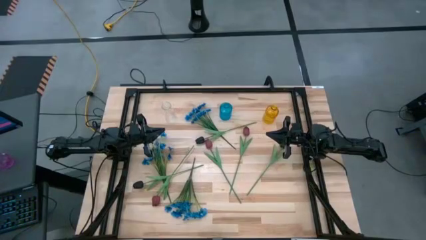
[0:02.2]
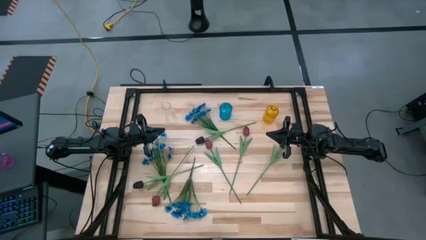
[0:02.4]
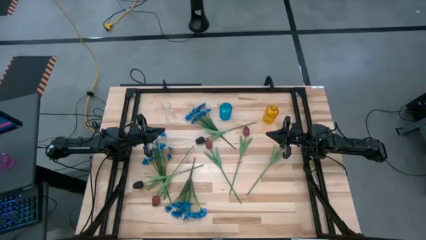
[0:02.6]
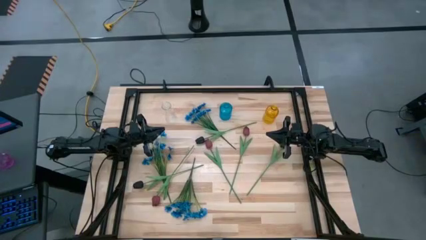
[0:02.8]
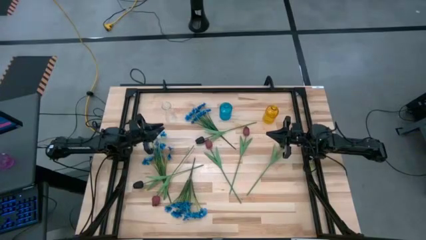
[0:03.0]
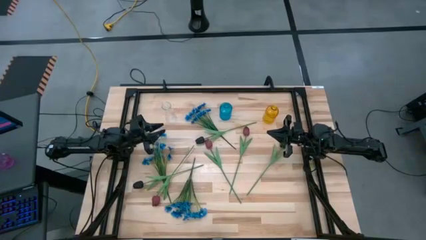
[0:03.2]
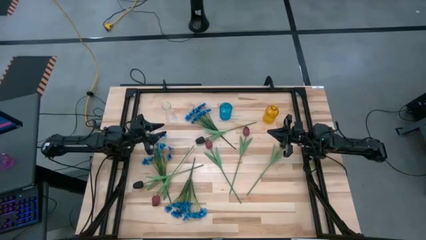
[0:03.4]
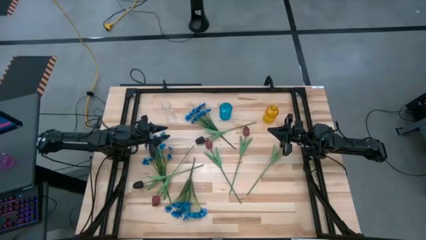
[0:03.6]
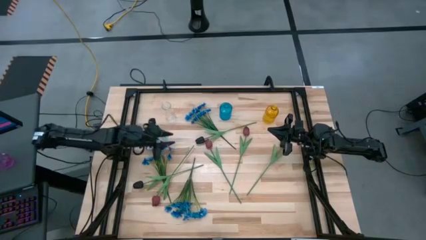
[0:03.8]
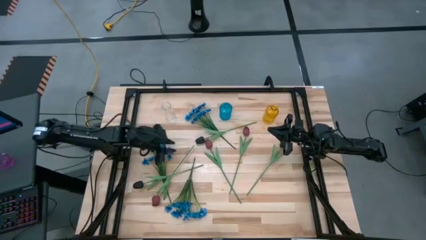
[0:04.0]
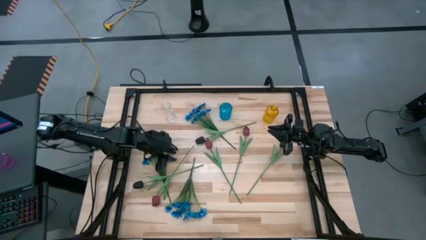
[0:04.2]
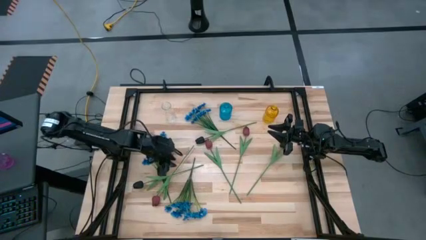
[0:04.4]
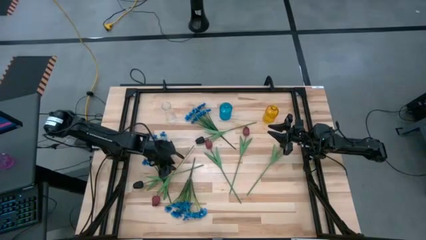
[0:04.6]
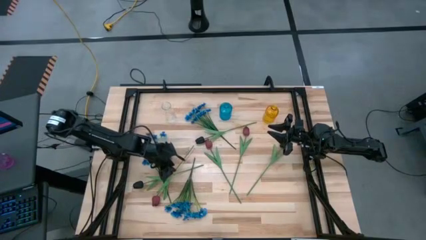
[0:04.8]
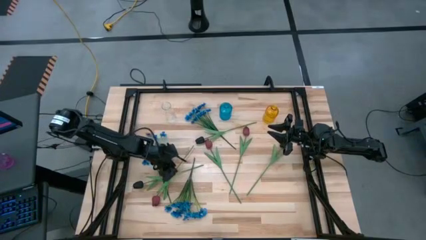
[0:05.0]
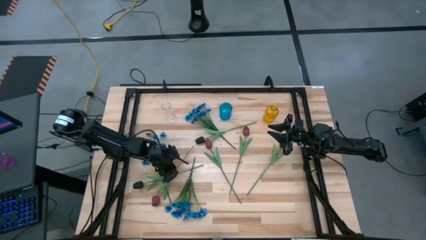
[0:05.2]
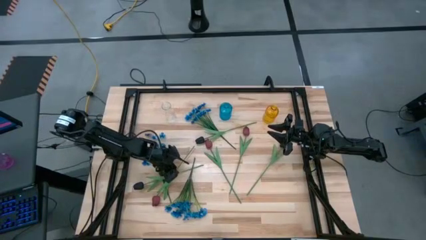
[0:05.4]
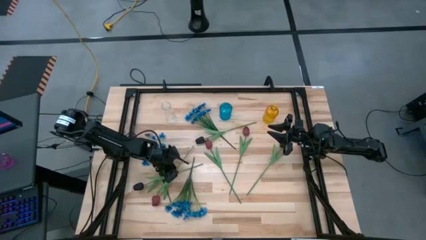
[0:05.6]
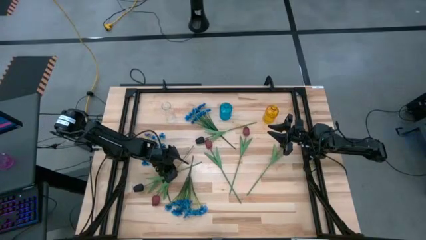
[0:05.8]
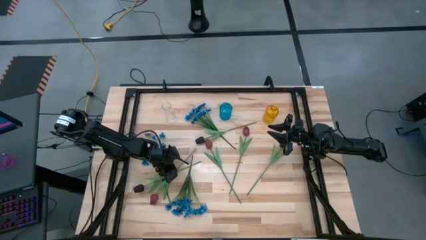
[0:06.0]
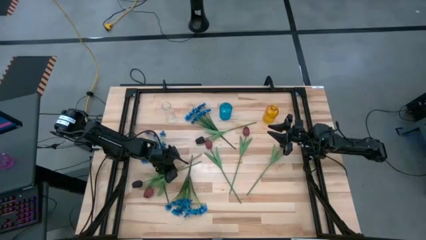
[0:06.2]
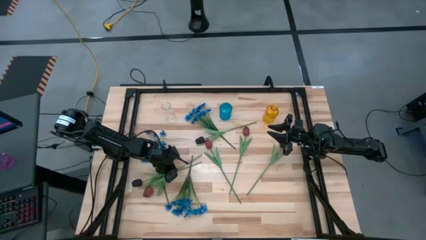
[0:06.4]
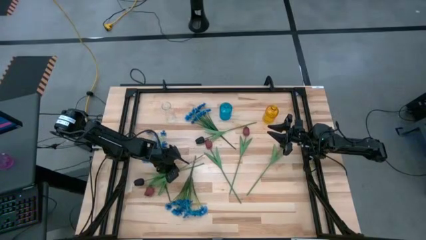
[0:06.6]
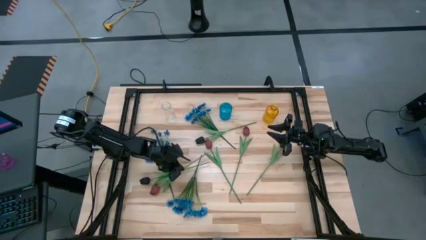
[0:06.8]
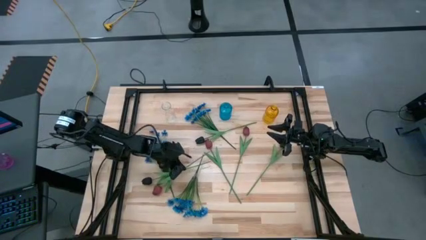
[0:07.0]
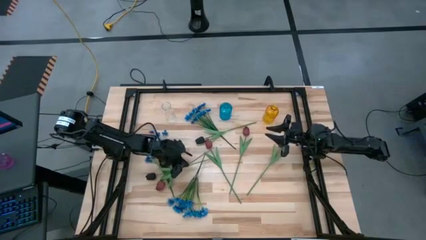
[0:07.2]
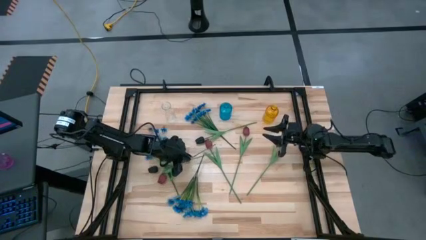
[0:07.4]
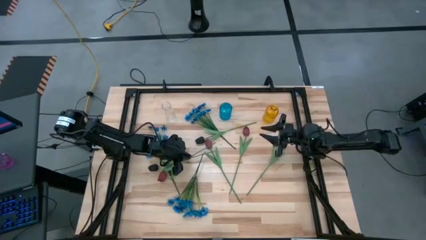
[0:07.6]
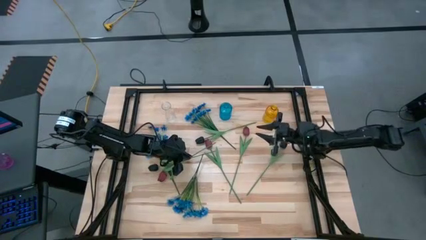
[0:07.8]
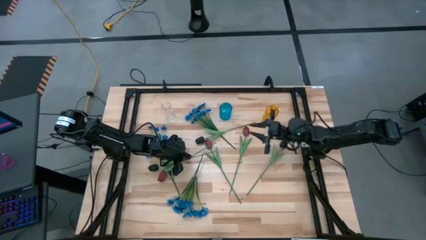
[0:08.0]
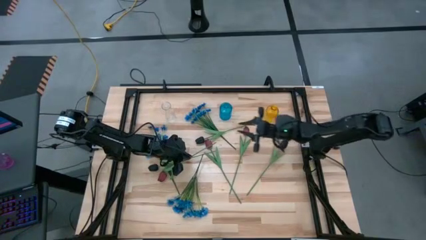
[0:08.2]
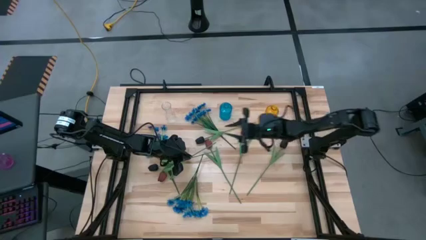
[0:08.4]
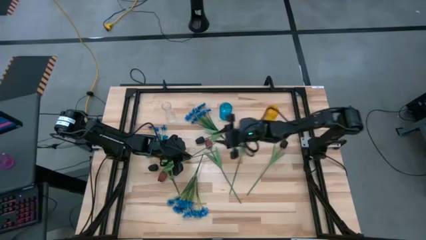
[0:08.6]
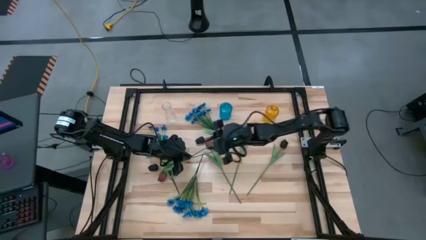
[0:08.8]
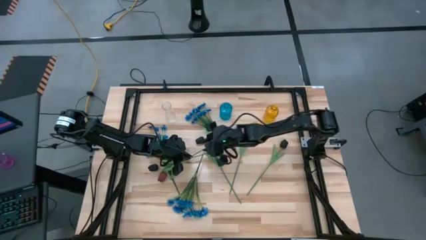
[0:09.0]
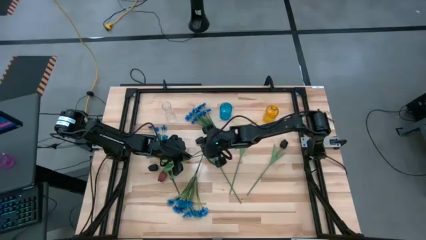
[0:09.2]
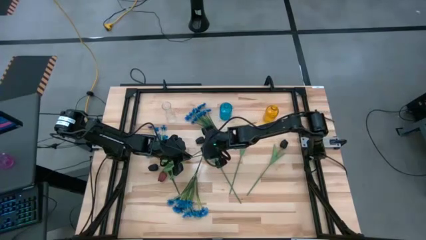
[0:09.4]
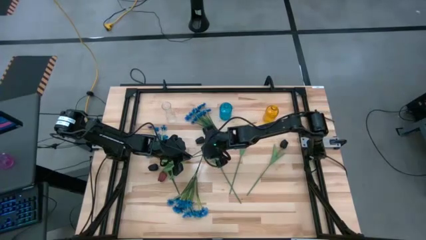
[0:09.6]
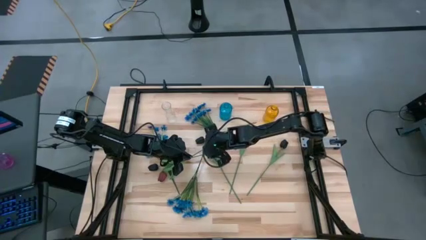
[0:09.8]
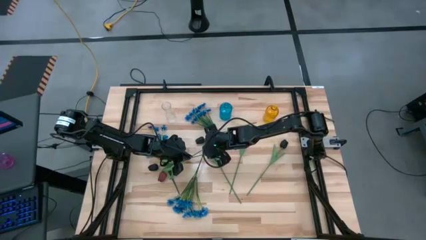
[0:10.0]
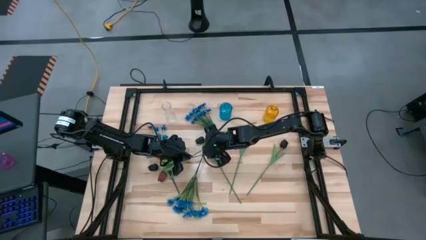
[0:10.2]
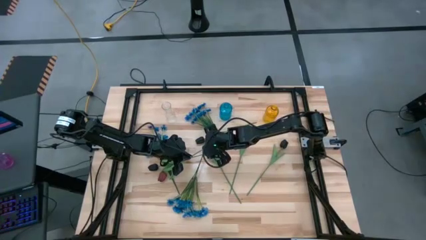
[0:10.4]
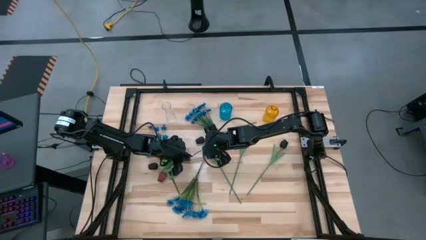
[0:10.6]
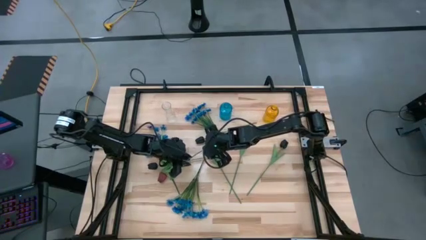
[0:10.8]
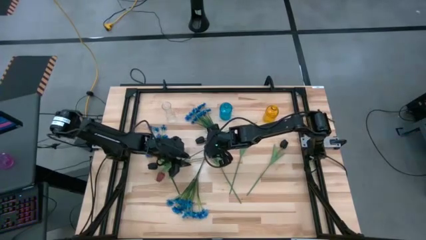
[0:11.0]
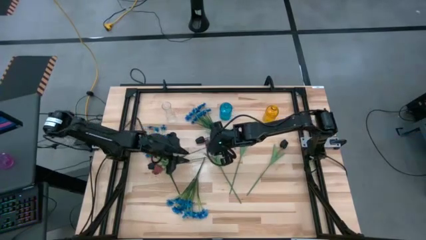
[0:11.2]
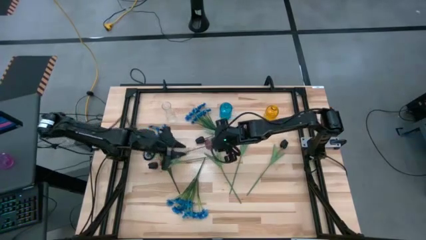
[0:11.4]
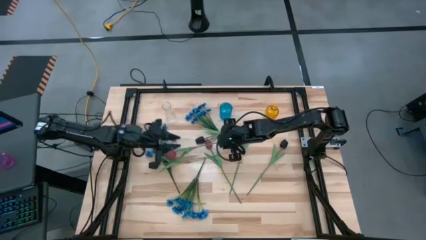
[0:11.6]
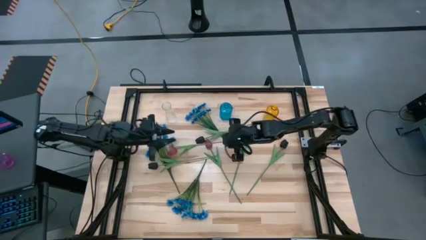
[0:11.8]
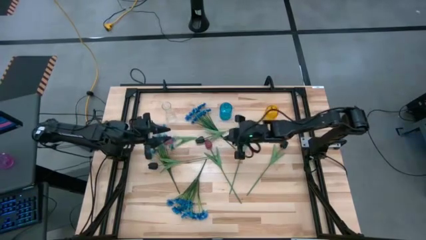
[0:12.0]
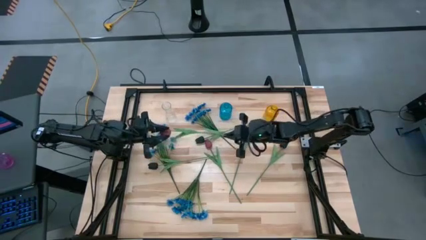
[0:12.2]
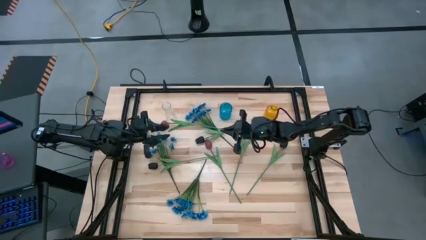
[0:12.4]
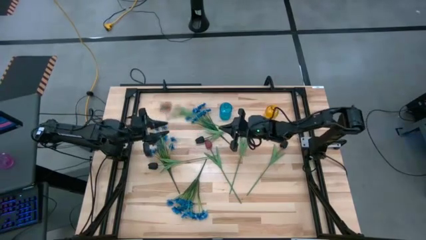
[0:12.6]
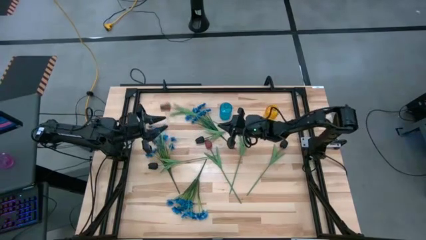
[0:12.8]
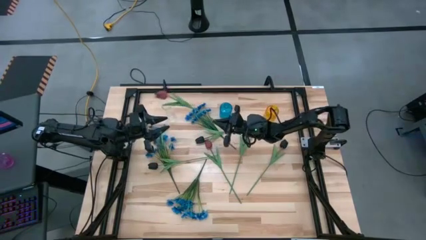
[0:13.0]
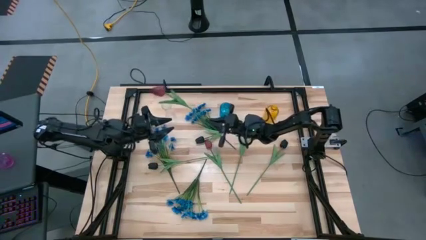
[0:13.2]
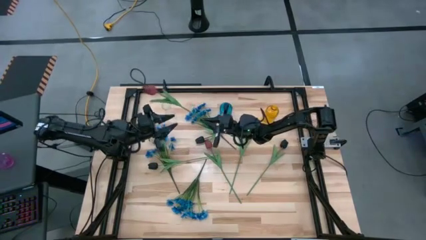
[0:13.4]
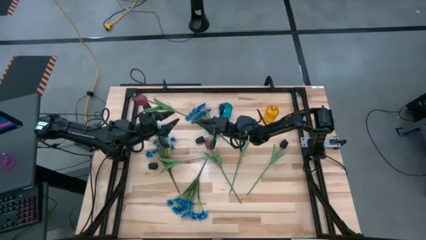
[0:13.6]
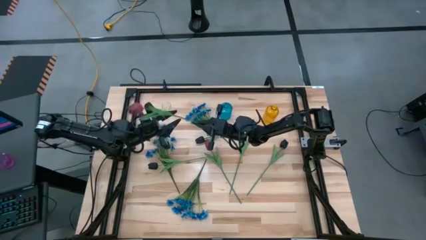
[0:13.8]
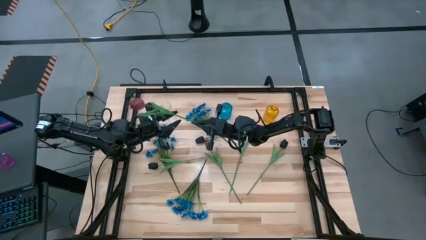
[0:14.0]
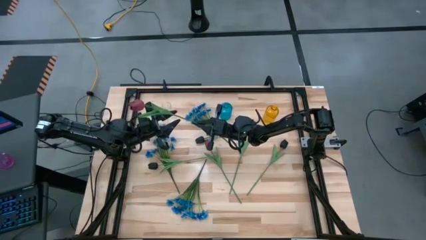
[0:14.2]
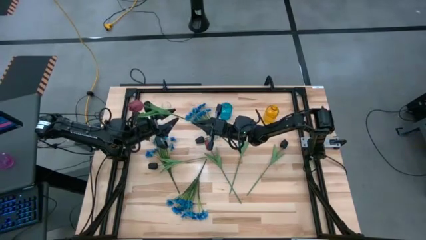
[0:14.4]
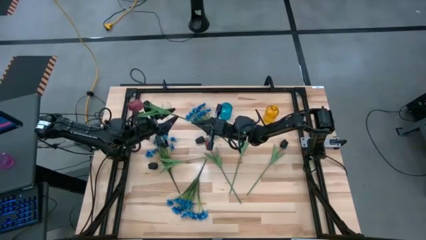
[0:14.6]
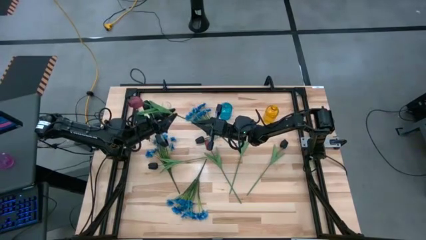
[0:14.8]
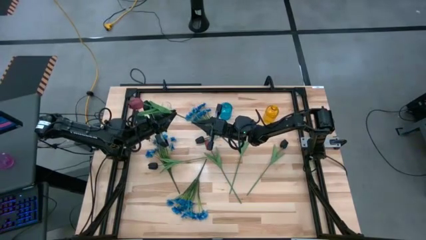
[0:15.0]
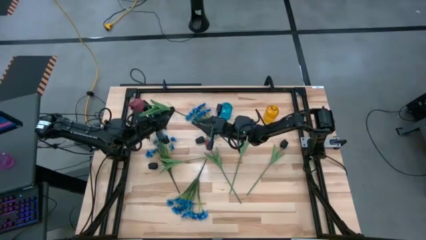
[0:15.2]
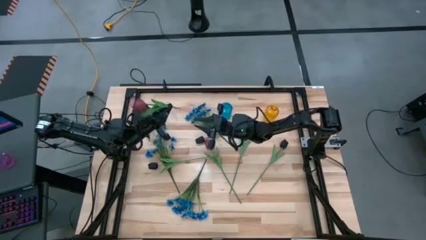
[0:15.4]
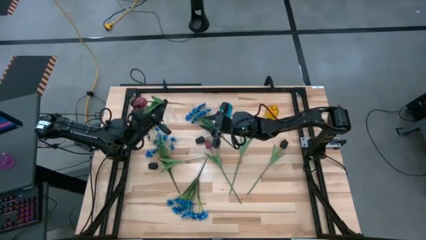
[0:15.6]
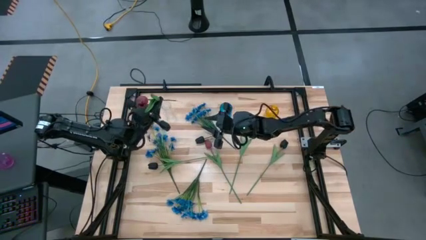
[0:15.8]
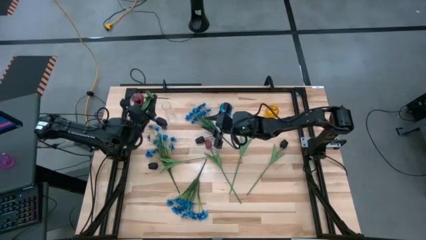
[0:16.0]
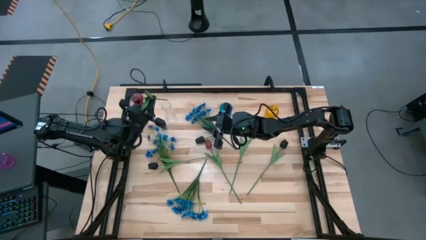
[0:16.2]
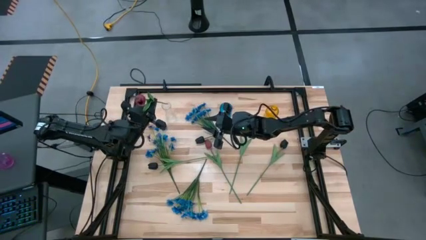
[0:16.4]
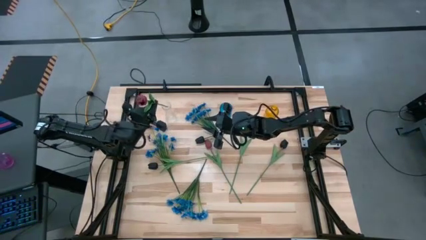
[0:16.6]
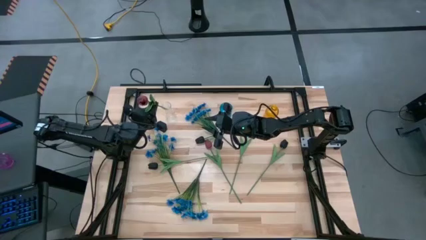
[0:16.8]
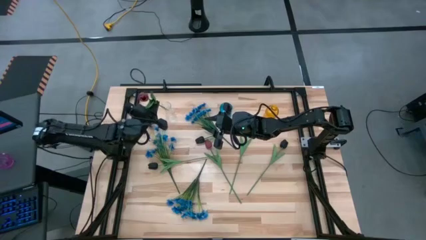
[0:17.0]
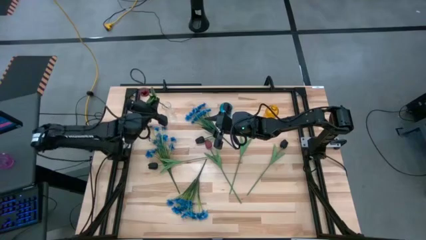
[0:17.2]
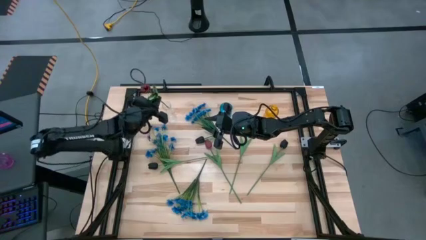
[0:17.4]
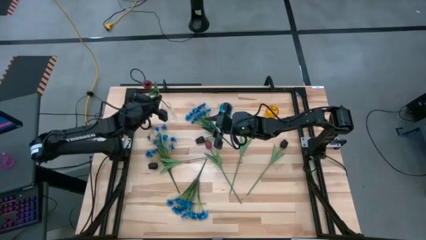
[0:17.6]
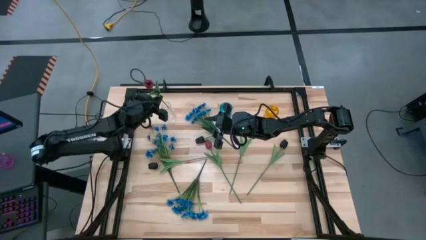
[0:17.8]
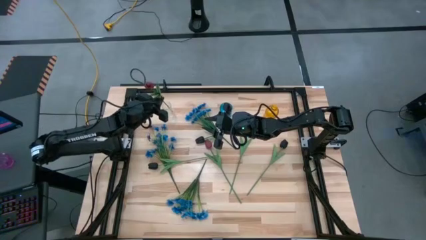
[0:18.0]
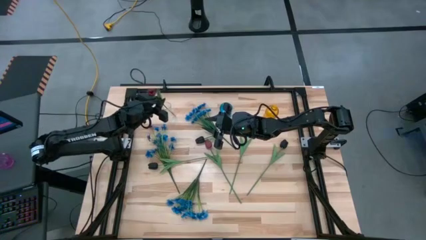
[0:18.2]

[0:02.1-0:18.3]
Task: Sort flowers into vase by color
Put the left red flower into the transparent vase
